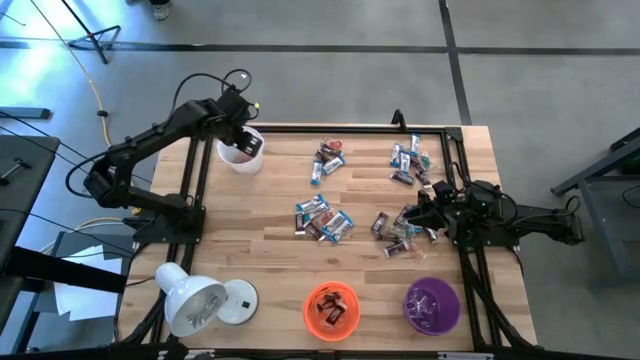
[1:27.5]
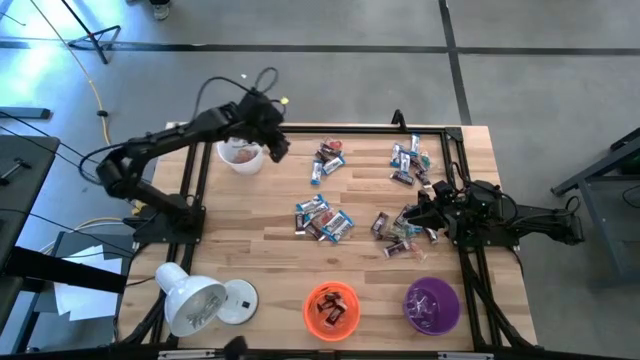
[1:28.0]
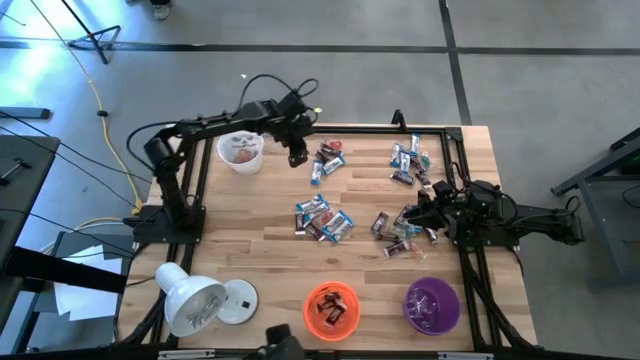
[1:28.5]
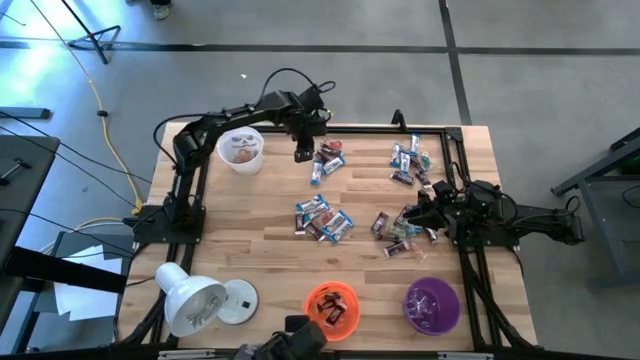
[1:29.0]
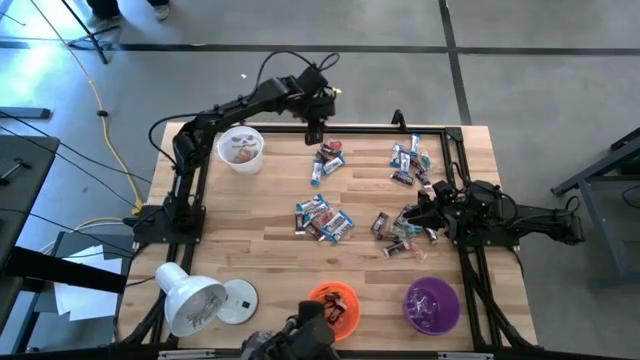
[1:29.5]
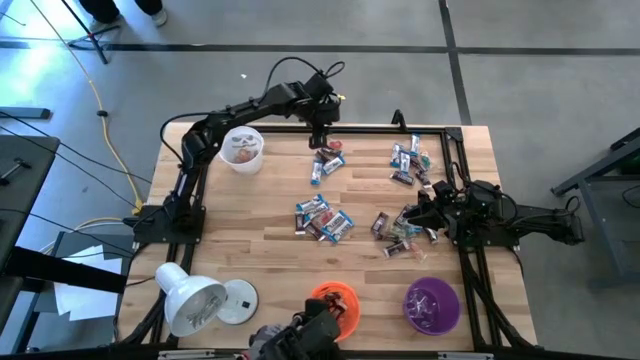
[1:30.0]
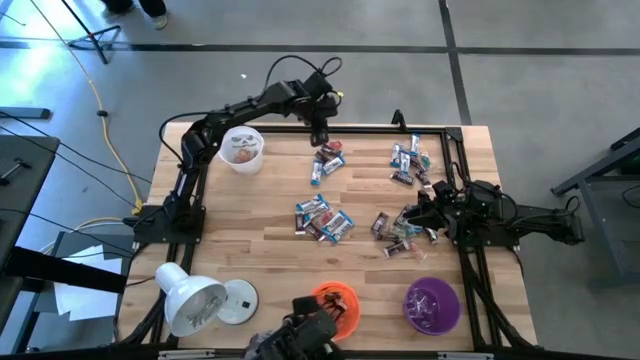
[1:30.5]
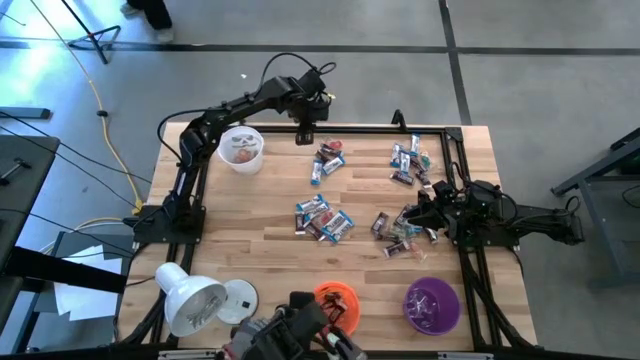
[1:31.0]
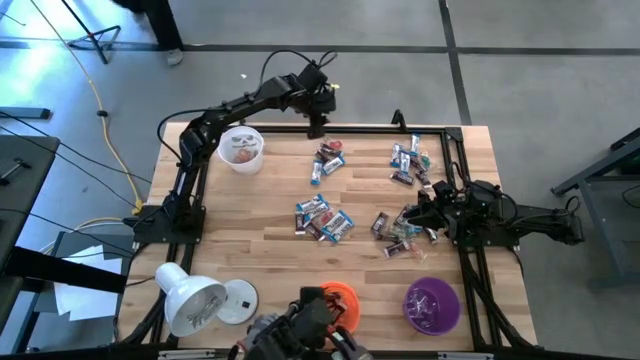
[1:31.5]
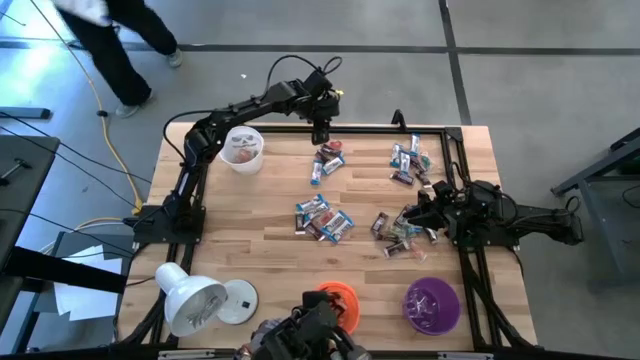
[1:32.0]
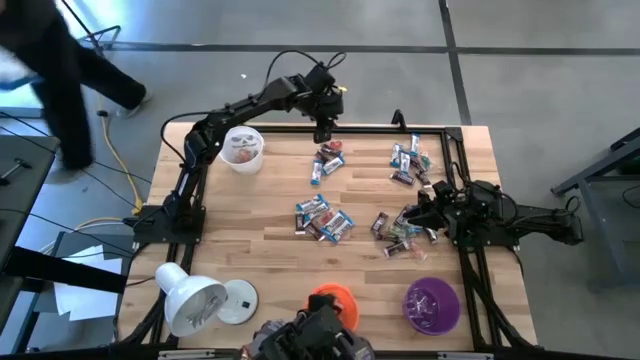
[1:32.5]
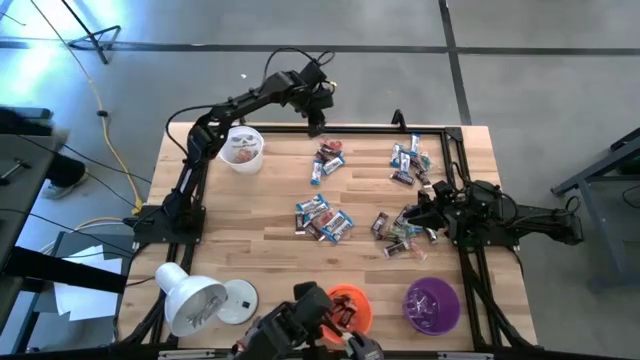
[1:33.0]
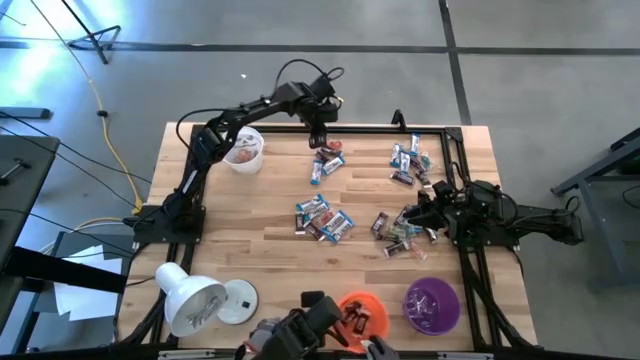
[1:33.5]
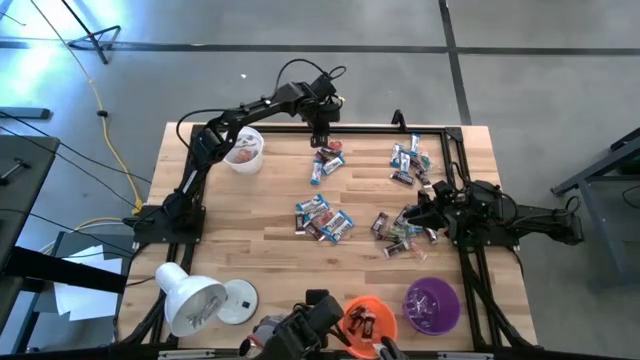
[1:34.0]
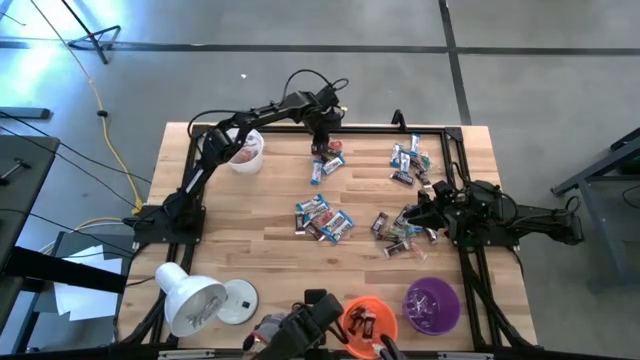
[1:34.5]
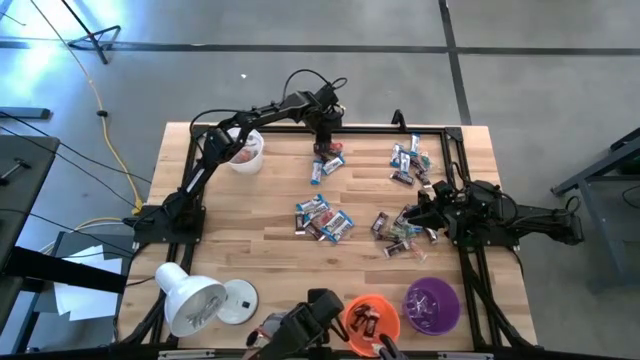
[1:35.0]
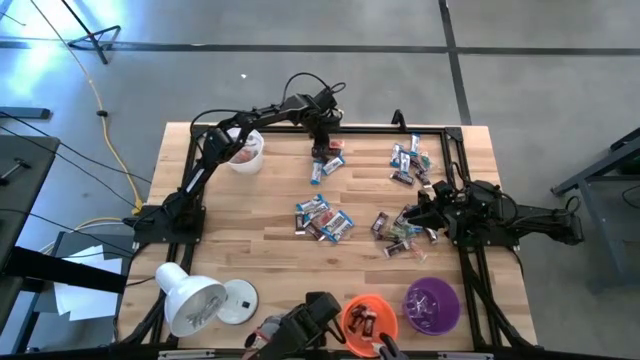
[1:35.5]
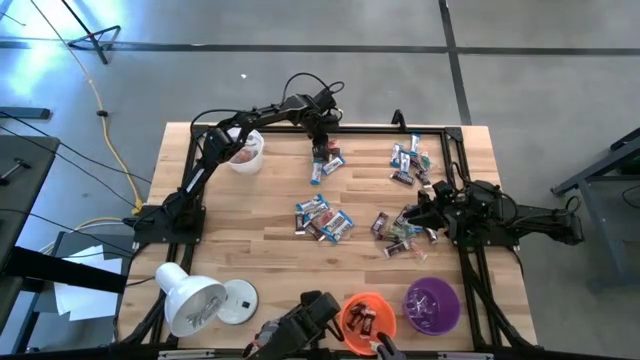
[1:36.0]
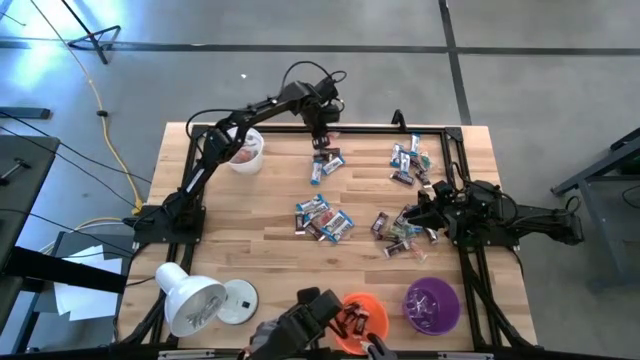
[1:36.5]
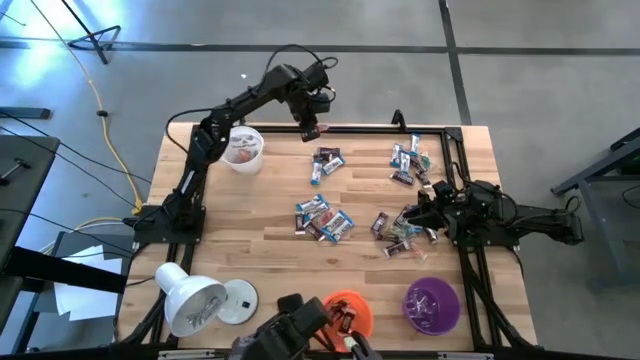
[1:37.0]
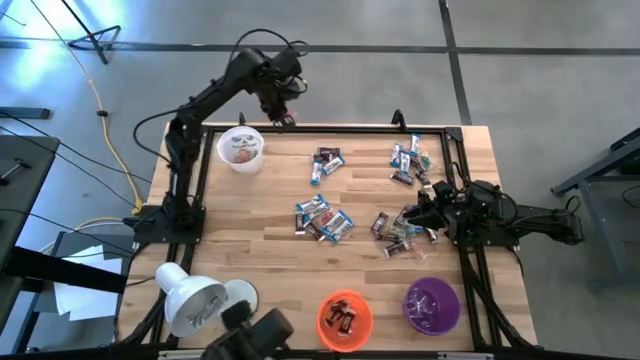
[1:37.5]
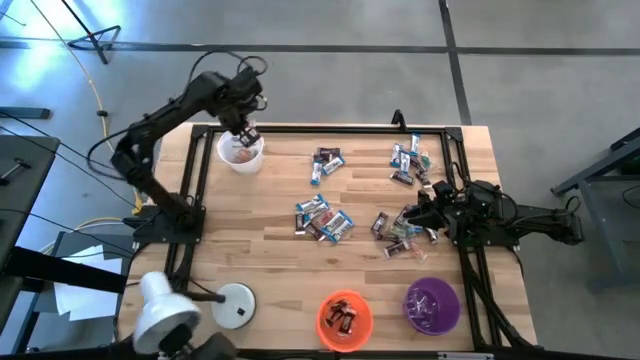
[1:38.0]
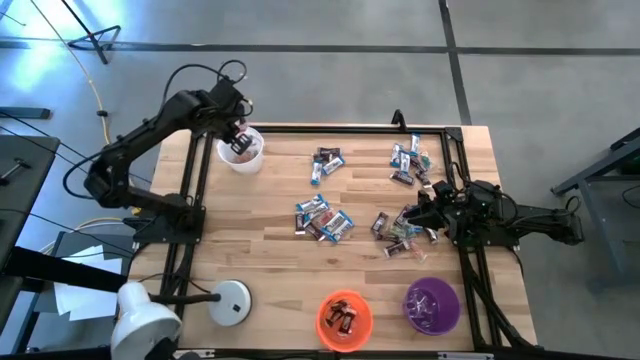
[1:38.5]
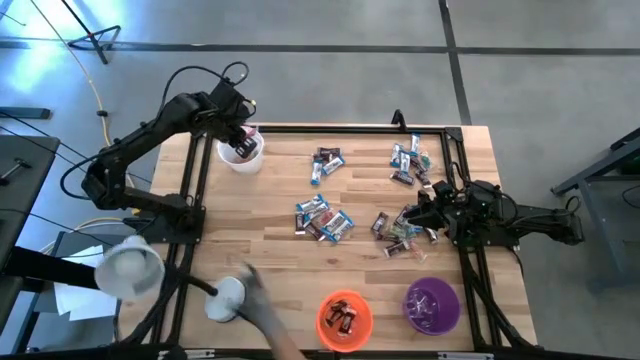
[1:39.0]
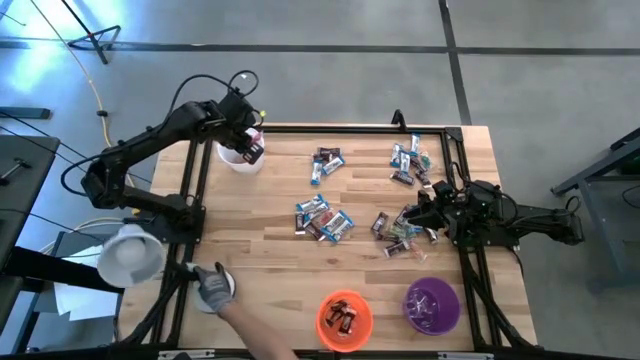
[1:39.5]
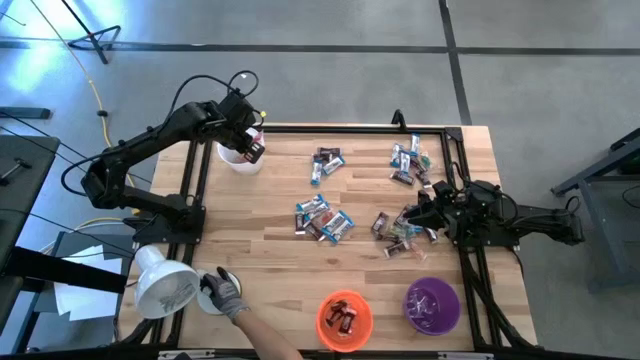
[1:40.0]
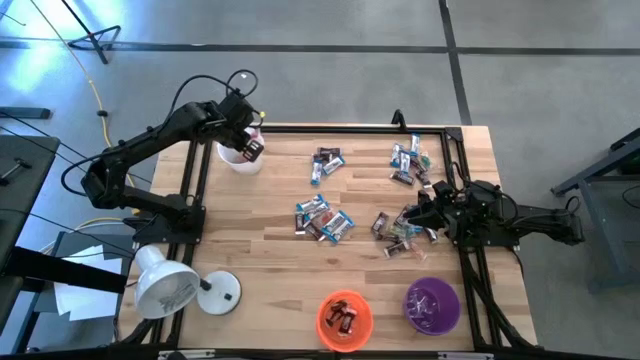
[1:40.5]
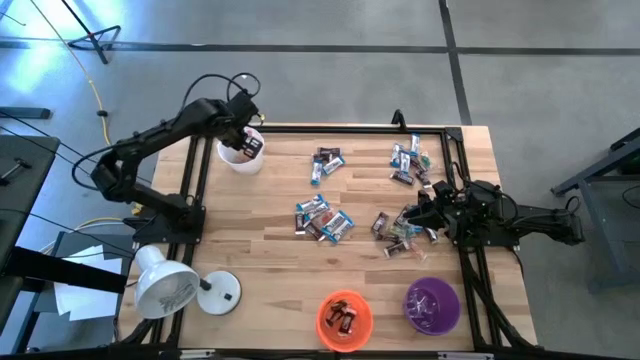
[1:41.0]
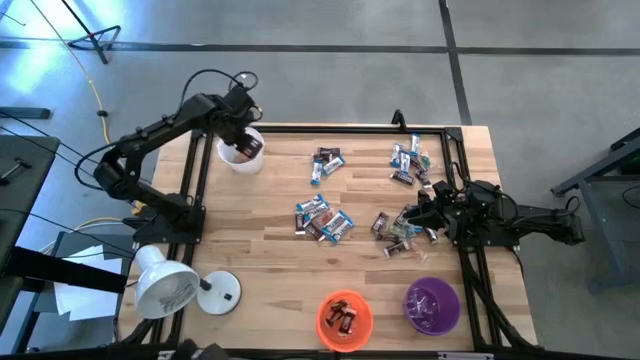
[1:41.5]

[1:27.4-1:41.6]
Task: Organize candy in baskets
Put the orange gummy into the white bucket

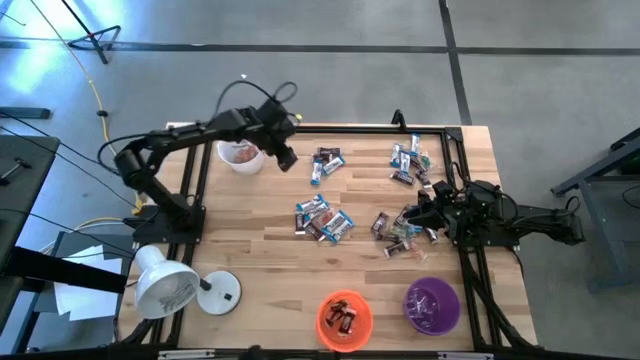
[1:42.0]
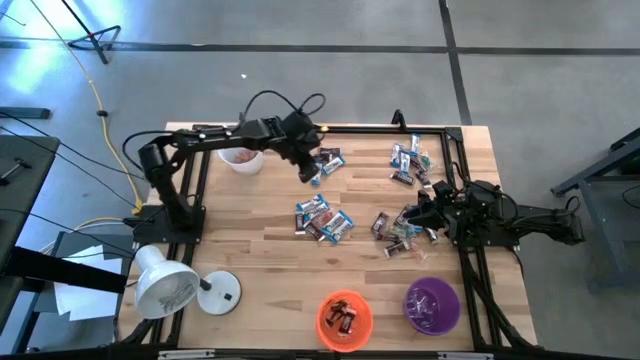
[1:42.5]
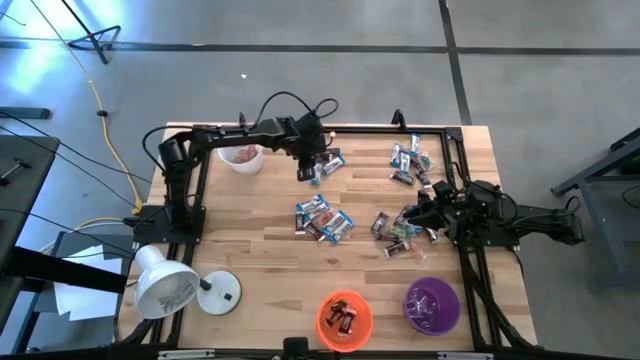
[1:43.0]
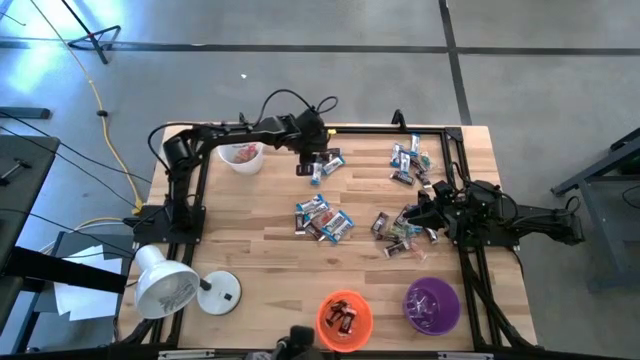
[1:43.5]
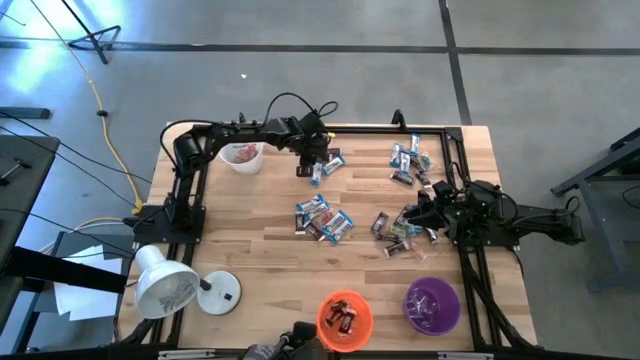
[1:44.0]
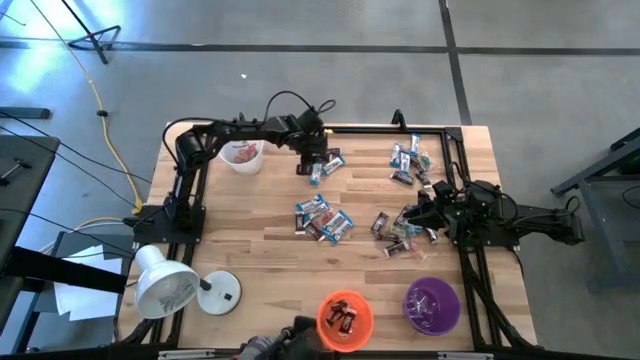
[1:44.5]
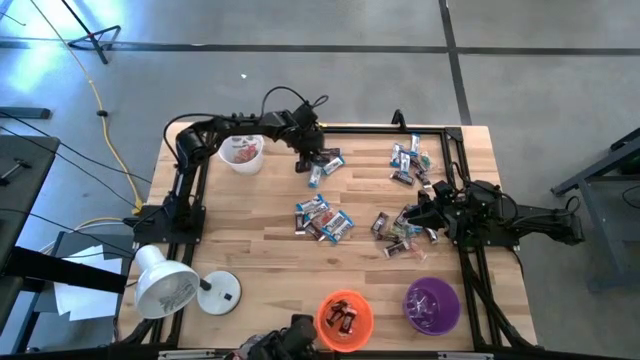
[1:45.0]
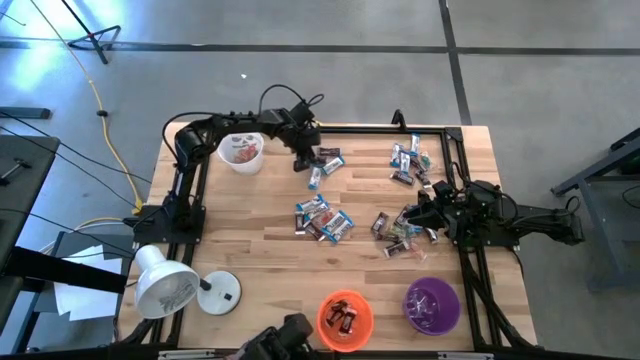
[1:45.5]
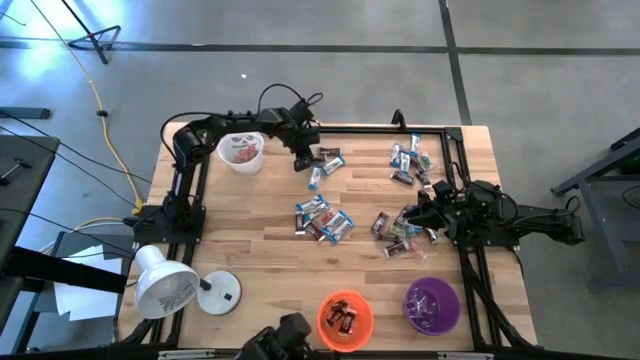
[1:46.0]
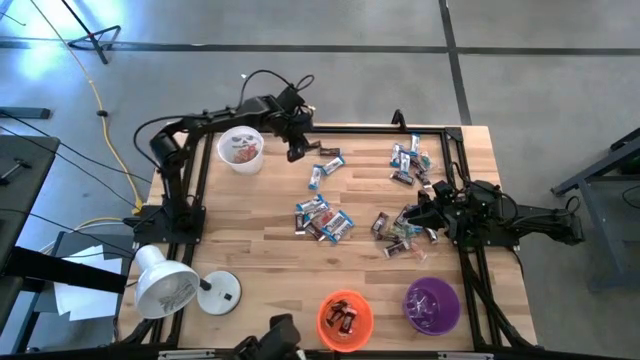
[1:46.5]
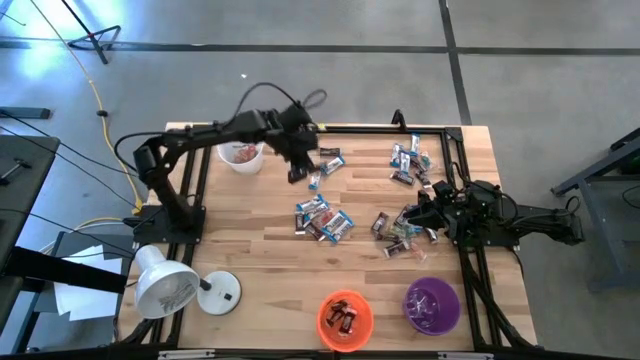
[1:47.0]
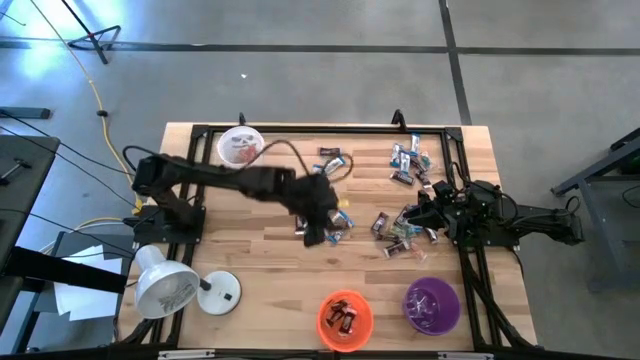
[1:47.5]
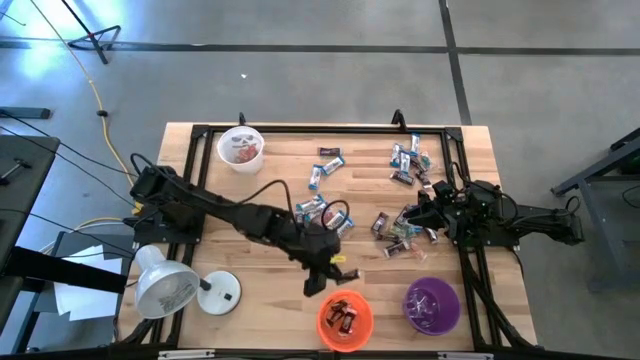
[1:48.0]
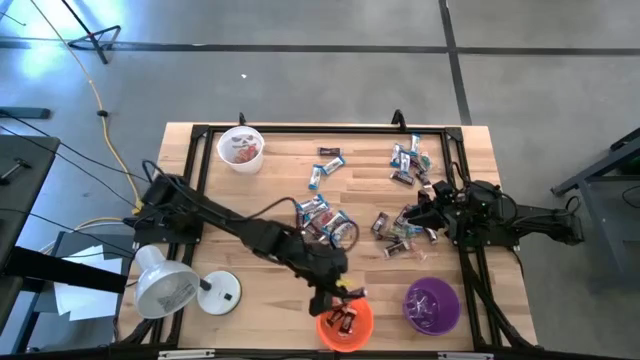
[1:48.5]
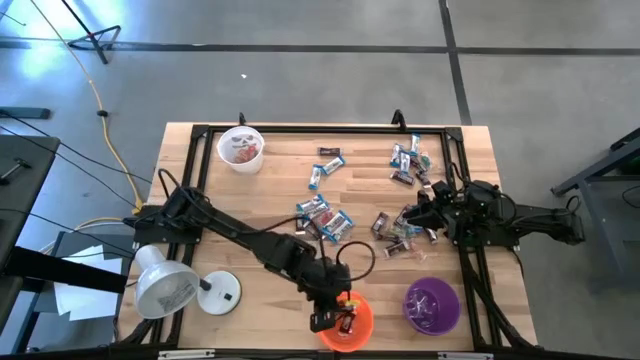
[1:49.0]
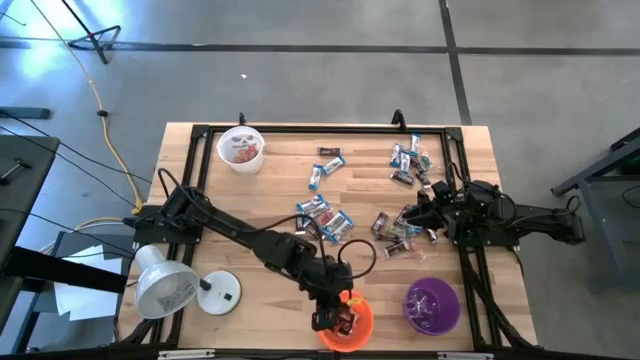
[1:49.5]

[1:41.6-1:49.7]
Put the brown chocolate into the orange bucket
